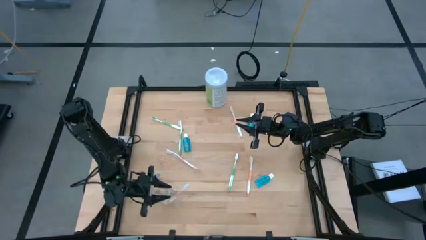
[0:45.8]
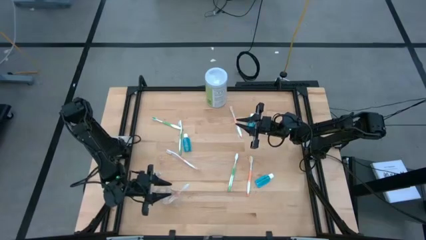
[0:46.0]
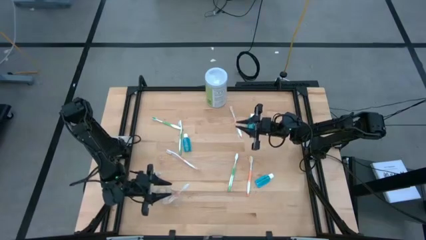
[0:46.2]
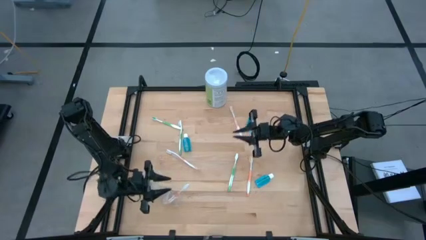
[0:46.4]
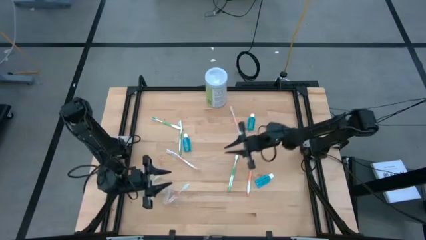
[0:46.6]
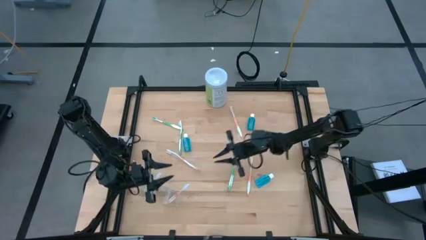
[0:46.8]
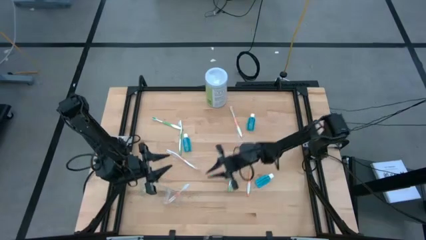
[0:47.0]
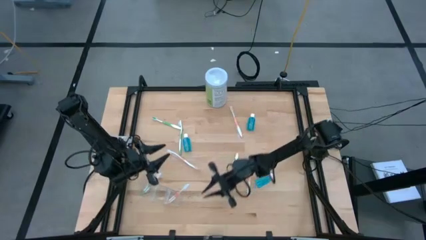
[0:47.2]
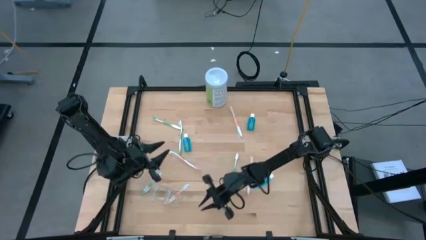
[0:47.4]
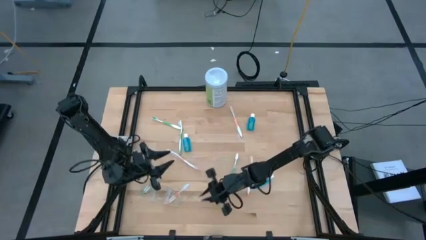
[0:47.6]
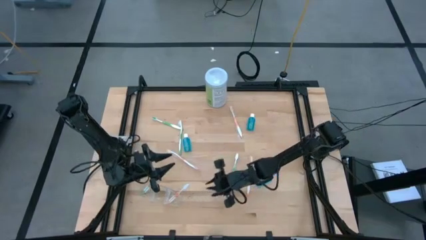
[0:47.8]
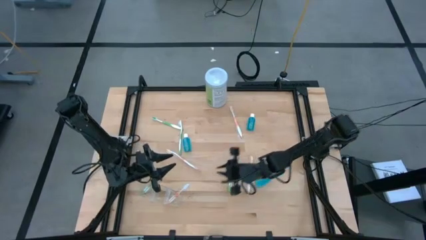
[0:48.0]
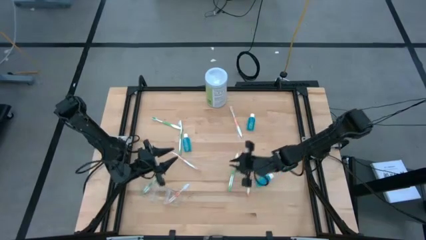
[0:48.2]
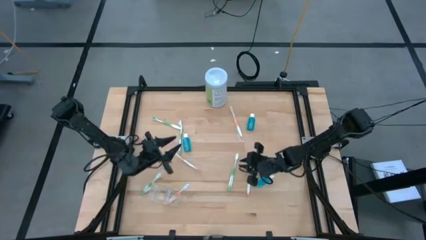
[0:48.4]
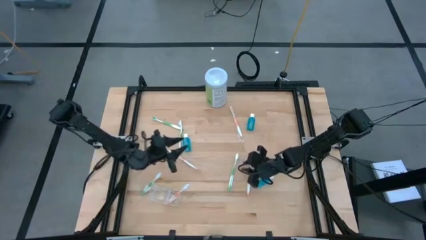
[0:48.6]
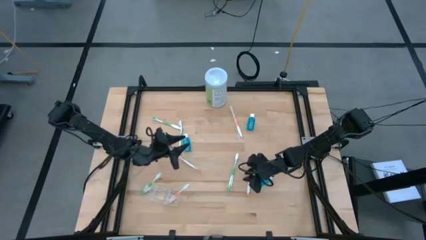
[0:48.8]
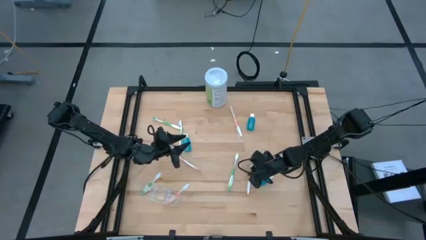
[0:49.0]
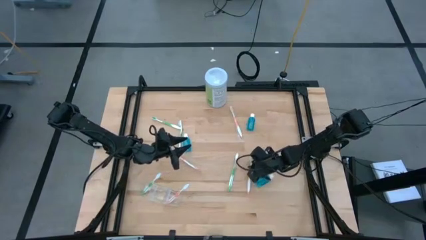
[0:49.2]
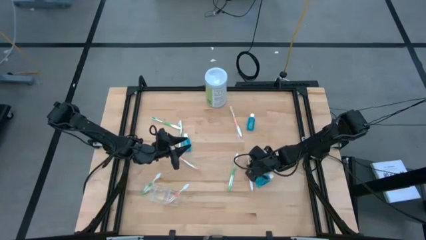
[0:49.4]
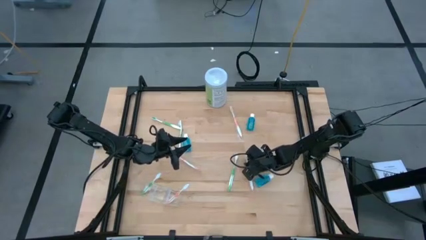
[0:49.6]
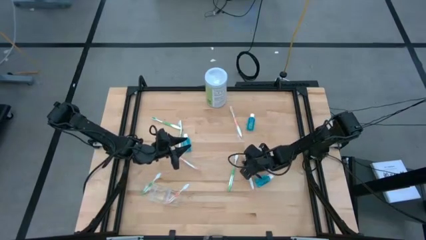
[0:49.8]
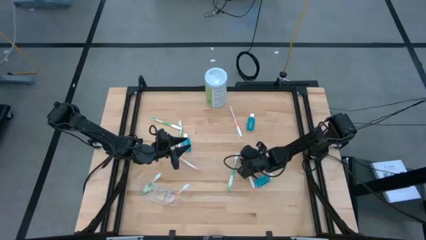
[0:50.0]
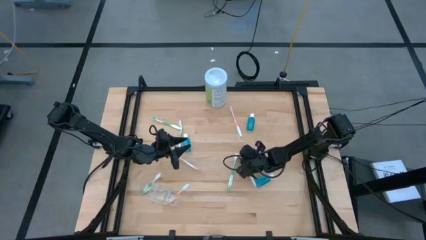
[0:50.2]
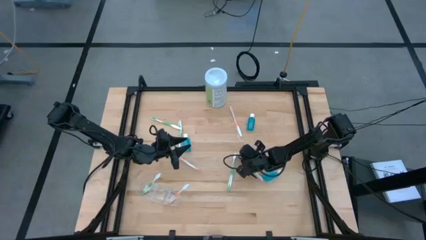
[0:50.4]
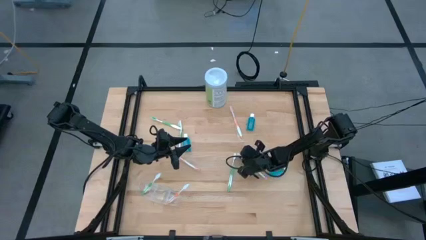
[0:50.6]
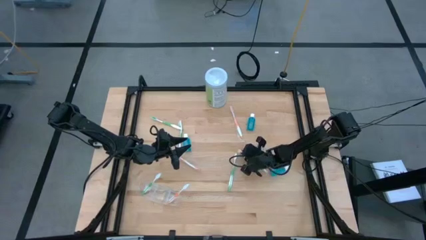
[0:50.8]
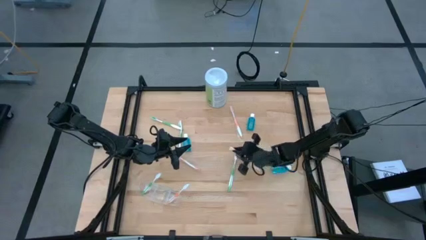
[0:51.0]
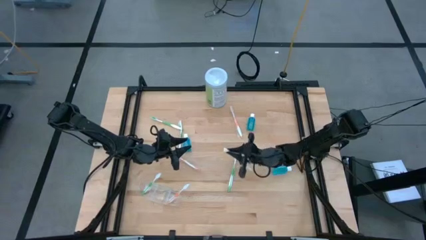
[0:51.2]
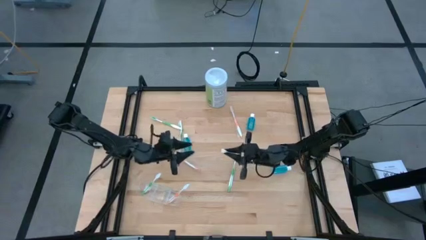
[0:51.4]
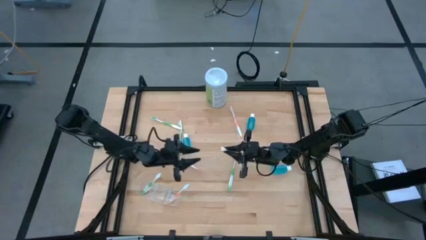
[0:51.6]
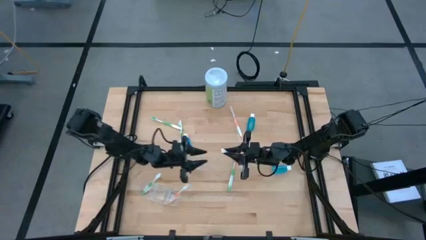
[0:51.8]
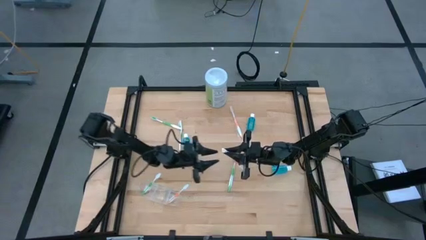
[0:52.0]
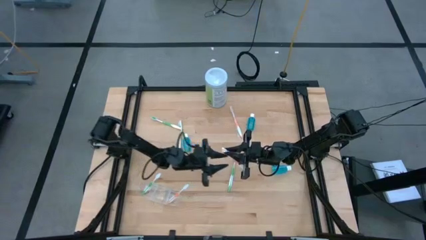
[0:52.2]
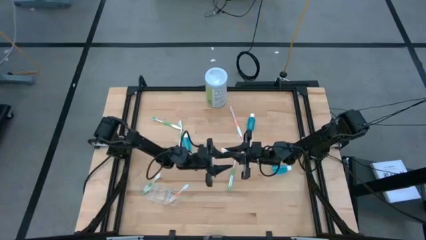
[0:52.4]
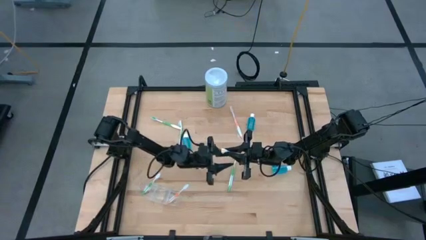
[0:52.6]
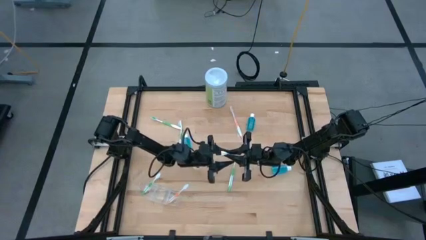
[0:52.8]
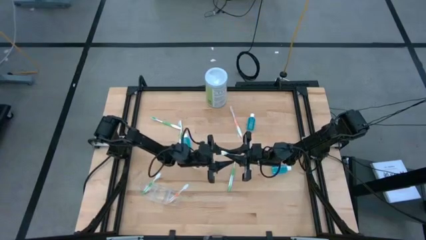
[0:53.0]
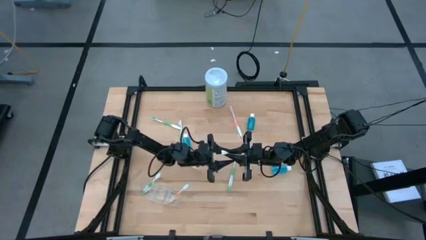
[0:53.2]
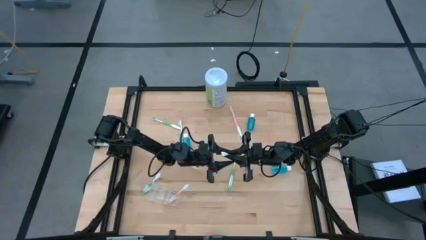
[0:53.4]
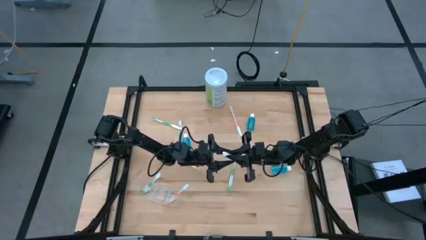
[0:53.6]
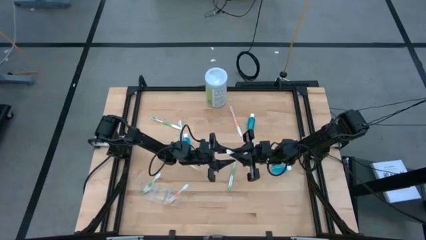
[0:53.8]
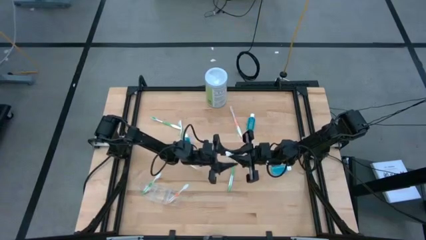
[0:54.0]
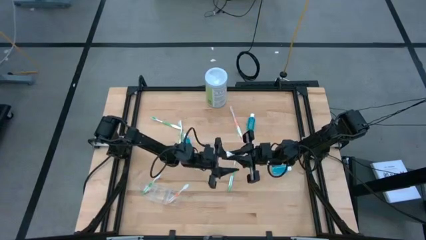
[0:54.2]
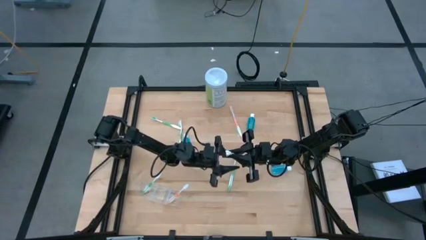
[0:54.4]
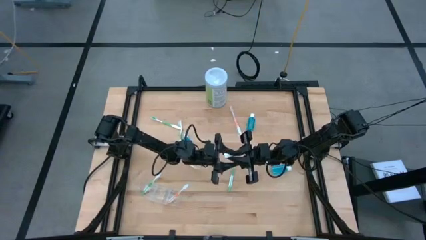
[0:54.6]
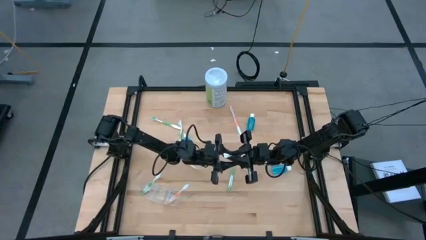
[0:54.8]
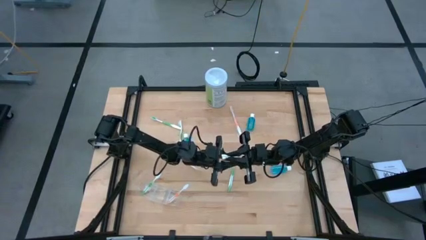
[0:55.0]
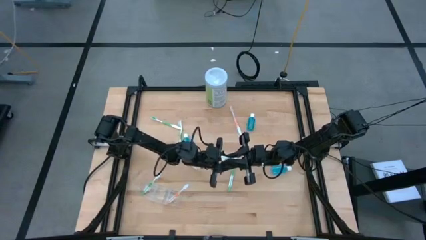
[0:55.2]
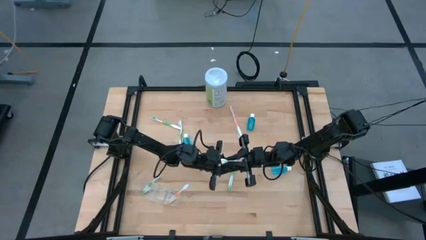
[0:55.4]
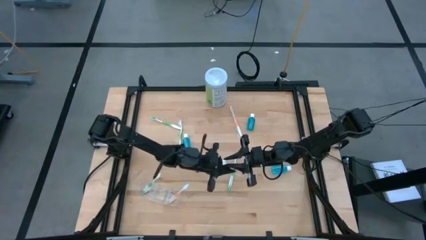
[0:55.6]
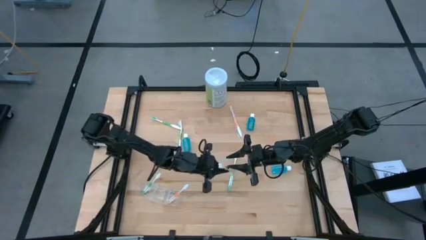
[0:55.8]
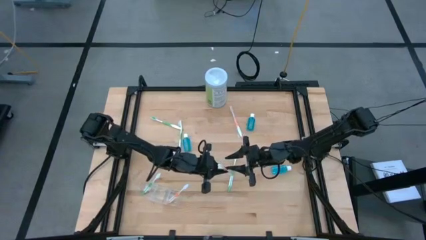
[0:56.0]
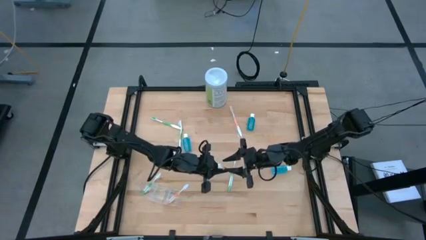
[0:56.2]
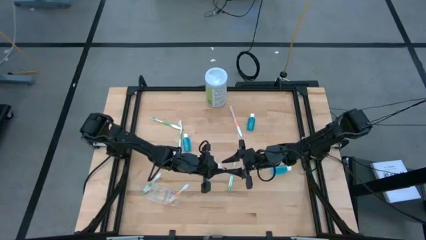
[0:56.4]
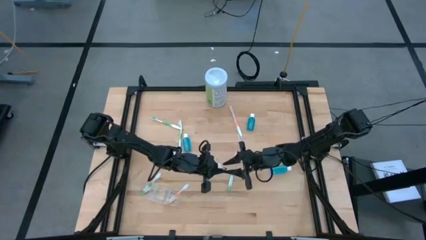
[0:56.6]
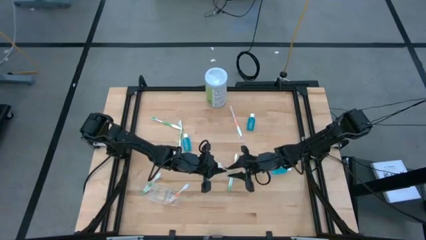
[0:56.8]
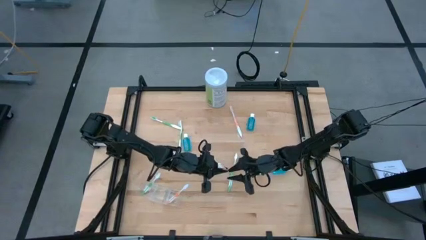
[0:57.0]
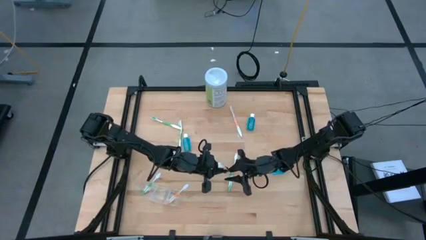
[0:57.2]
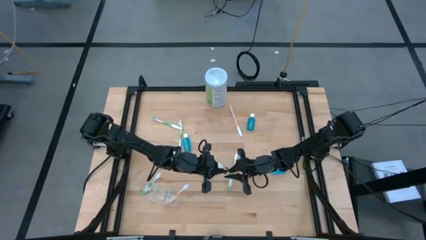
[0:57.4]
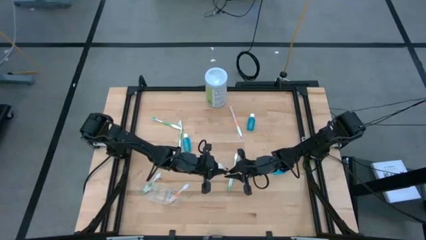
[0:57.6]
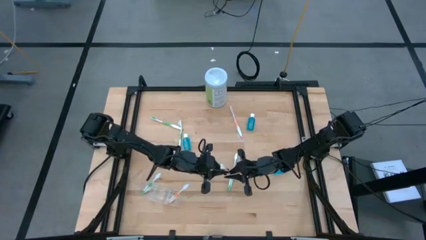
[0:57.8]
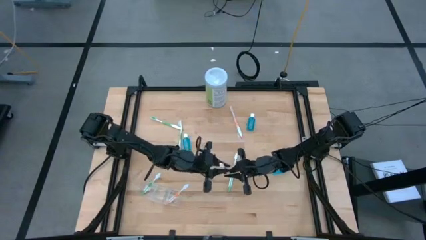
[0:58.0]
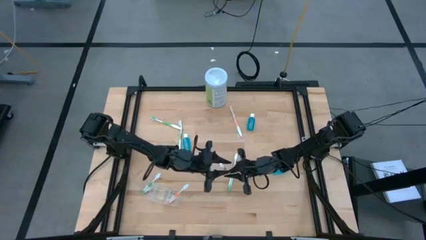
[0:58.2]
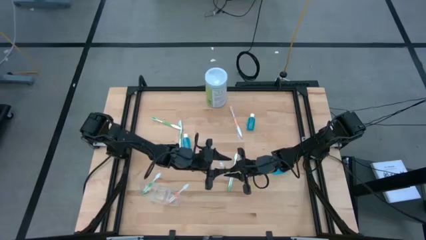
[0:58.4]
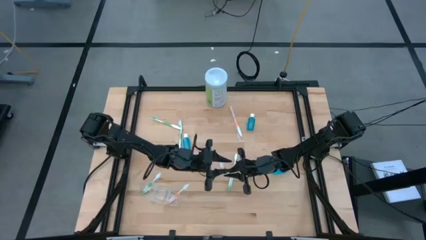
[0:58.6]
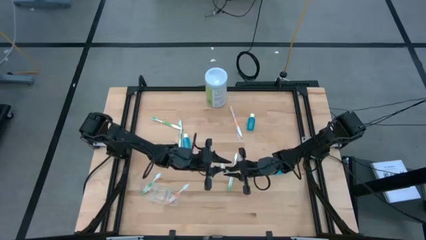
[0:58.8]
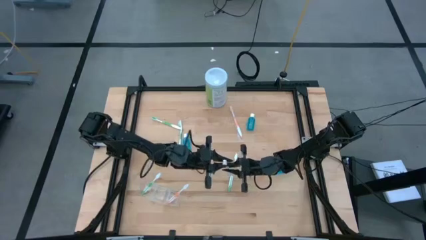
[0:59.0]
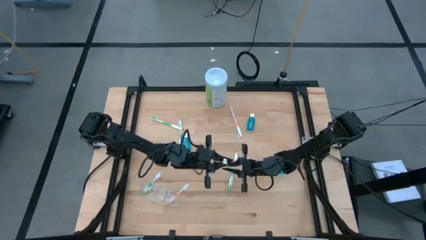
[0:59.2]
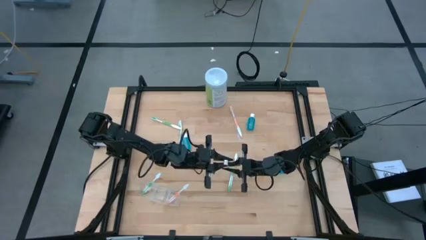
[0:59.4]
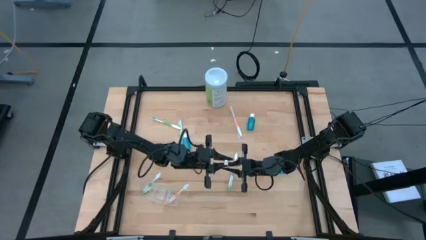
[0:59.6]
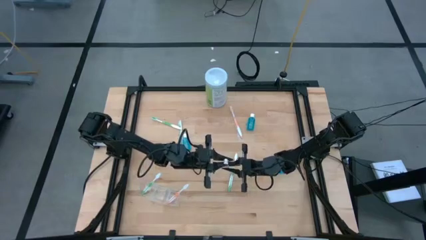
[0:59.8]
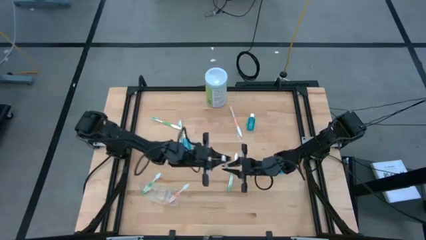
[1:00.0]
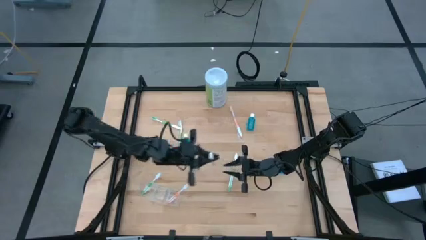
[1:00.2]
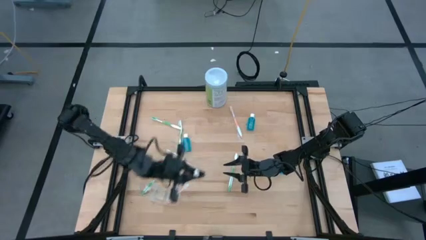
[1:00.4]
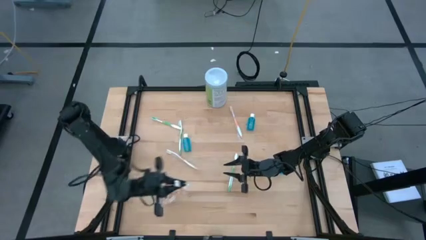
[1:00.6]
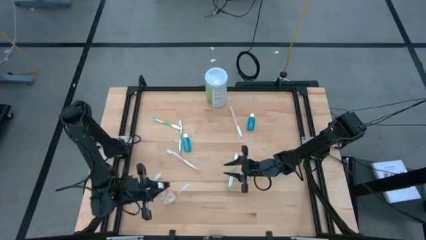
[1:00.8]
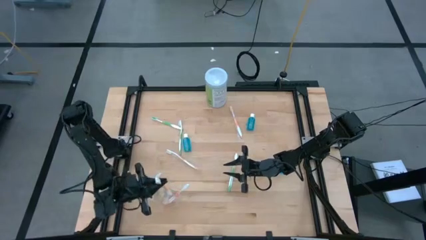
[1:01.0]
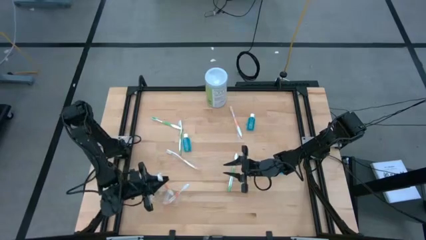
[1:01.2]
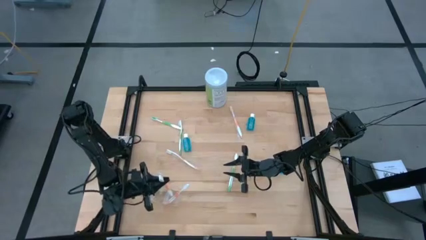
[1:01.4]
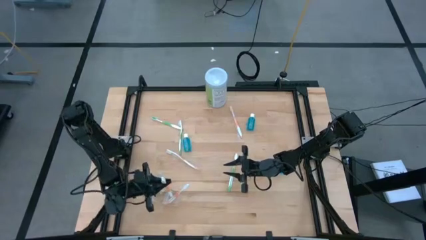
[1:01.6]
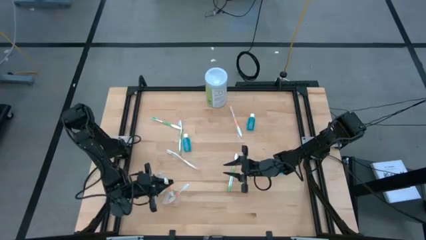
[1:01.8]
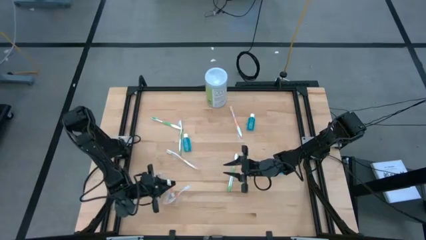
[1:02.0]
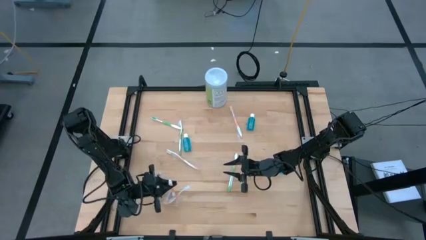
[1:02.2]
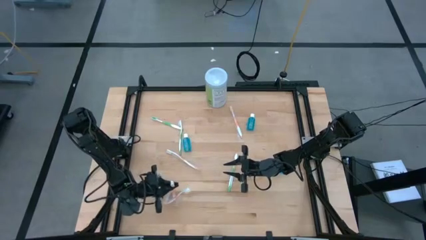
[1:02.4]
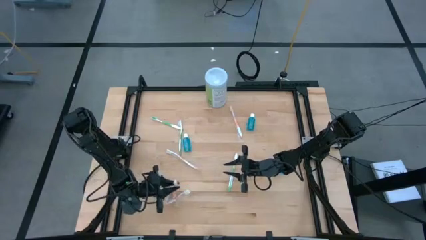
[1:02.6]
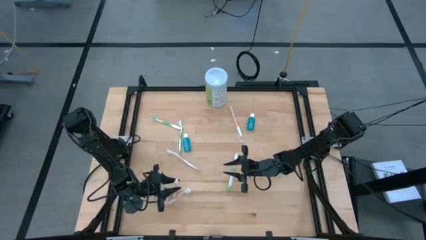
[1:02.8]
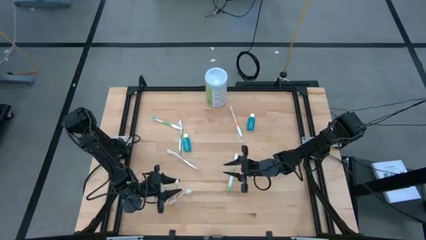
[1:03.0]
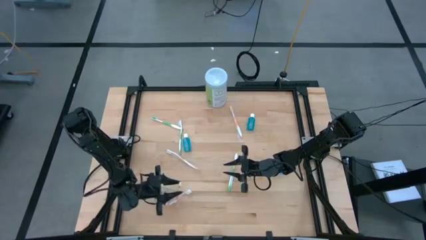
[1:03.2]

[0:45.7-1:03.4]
Task: Pick & Place toothbrushing station
Put the orange toothbrush into the transparent organizer
